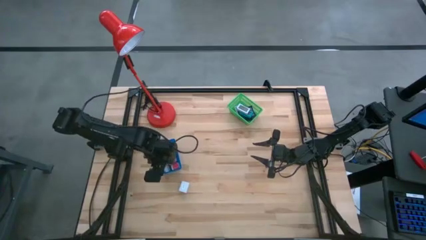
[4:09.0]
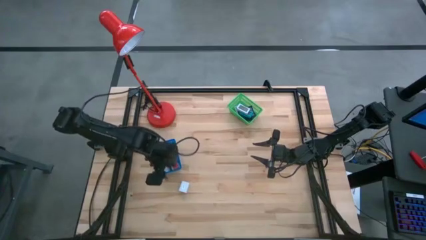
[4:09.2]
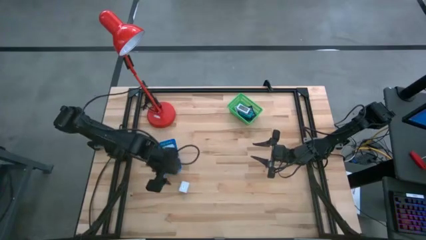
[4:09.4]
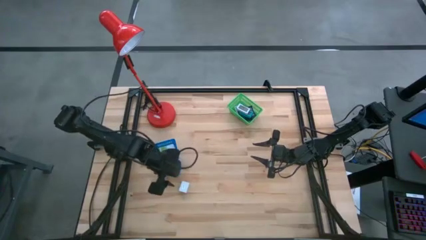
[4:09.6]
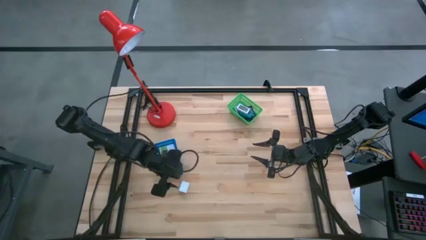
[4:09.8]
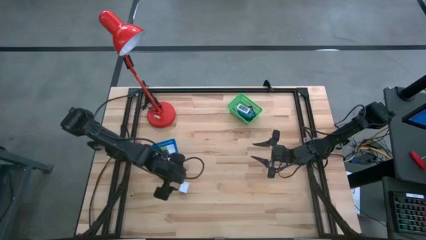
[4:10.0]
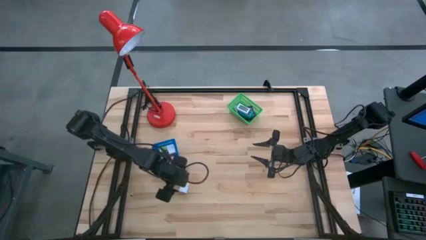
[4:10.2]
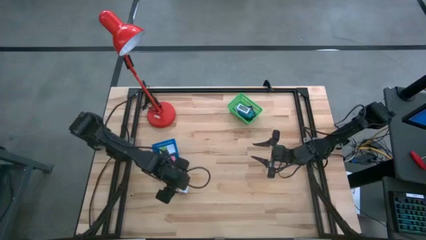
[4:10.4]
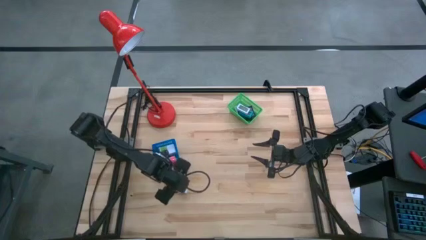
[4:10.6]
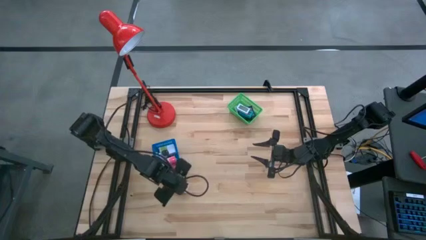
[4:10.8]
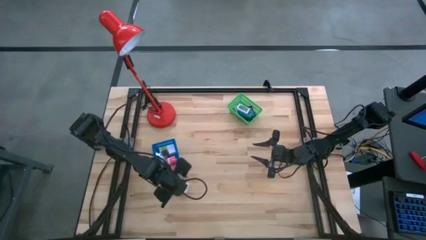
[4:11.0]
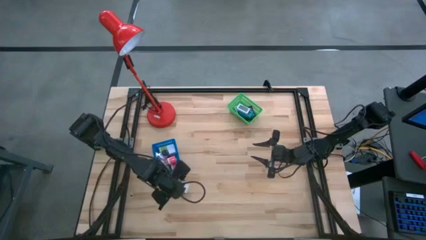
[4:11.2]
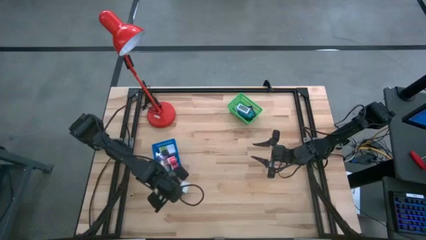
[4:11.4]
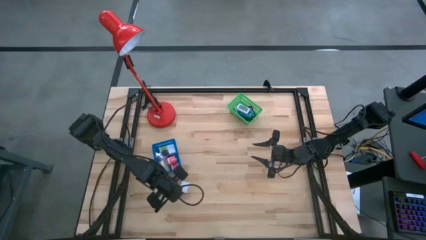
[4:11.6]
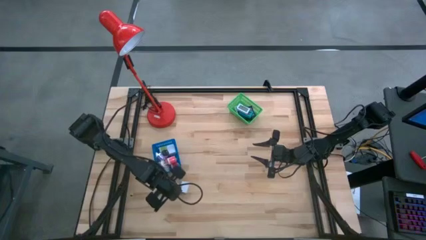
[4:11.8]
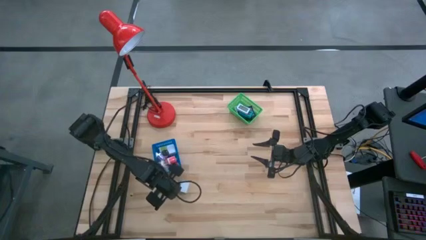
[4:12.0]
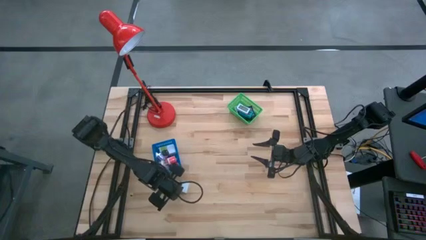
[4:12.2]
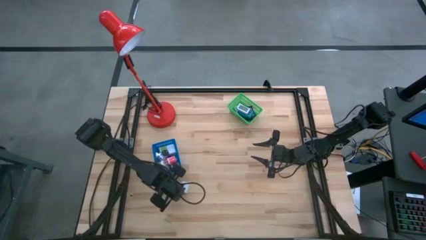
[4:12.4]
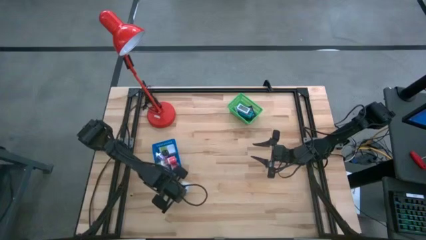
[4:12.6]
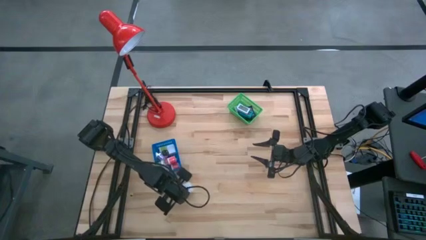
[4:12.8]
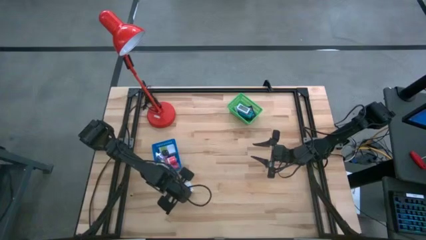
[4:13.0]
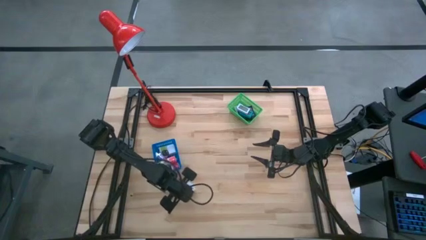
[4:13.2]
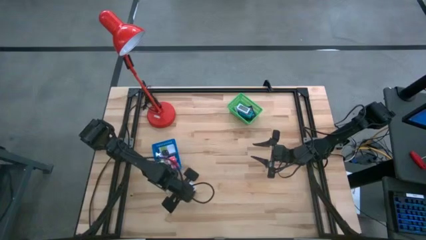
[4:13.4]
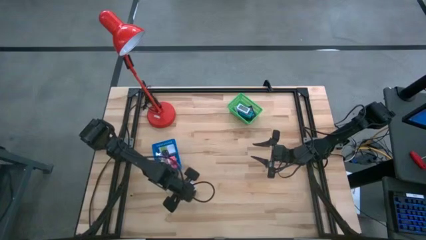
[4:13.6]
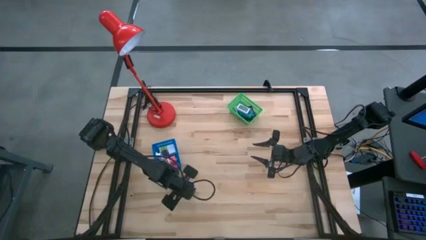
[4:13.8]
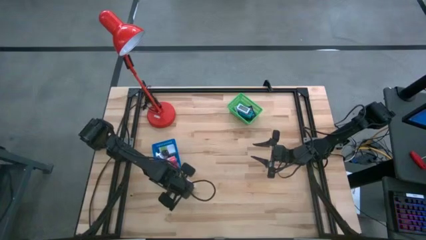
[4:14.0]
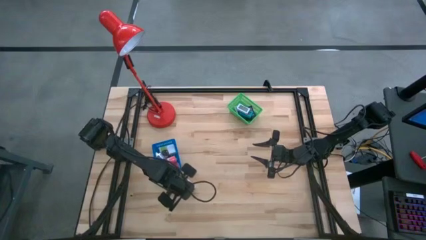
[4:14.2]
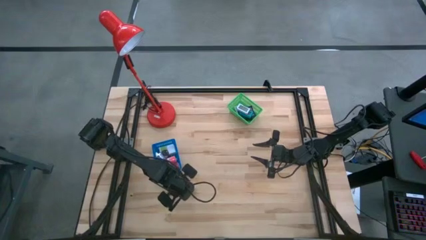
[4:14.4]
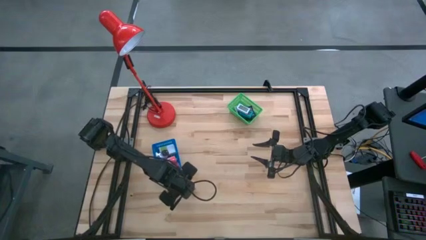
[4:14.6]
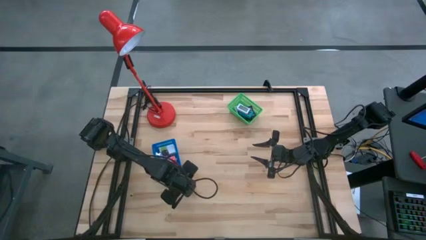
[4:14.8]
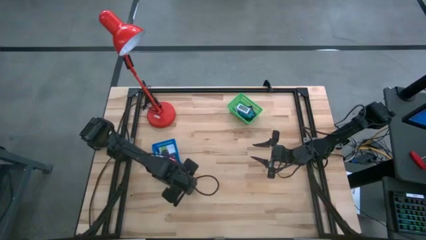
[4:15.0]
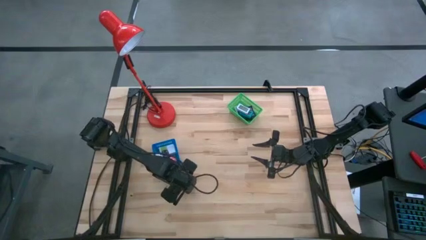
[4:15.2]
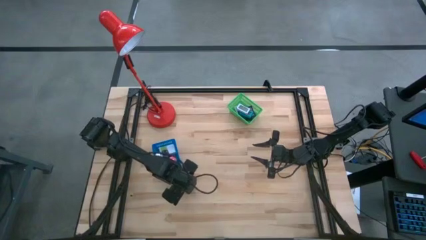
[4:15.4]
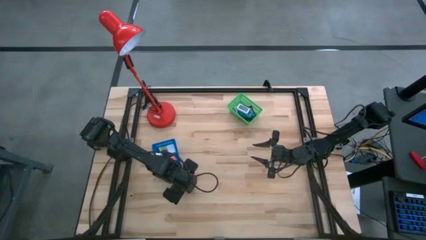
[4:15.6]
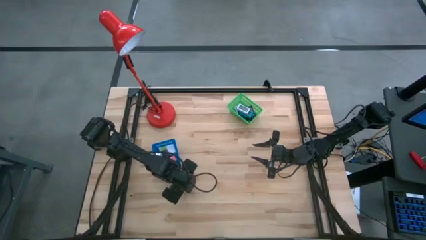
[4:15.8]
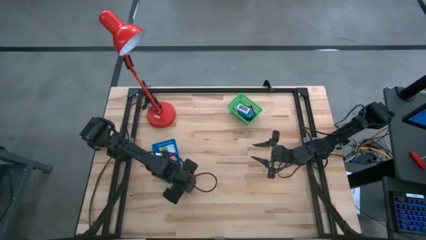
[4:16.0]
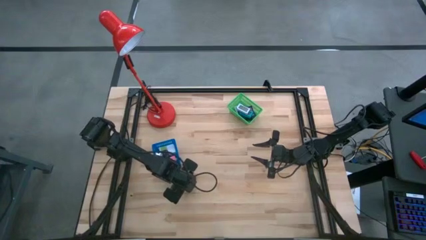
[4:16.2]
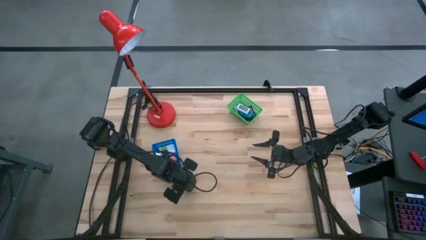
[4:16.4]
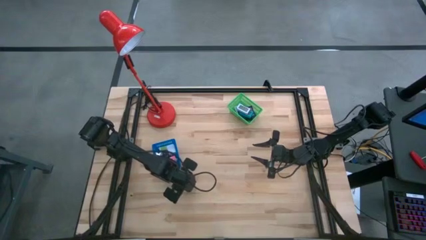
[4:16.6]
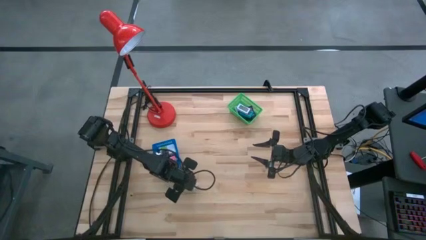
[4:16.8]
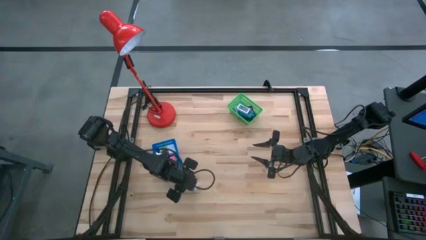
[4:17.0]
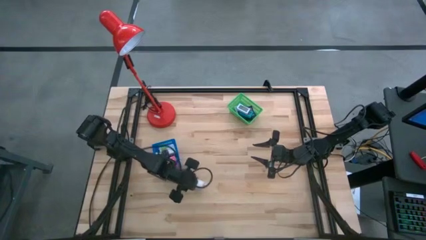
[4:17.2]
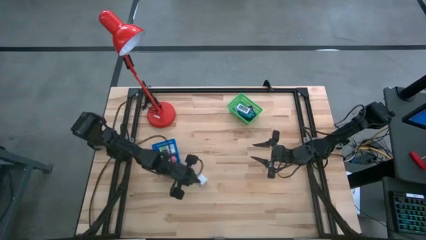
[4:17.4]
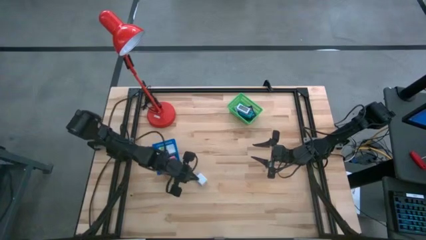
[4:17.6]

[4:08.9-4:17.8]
Task: Pick & Place Office items
Put the white charger adapter into the blue basket

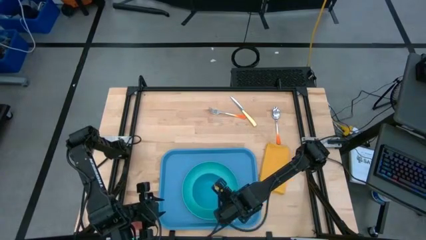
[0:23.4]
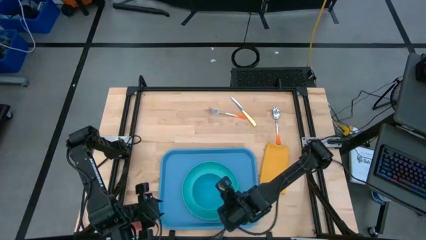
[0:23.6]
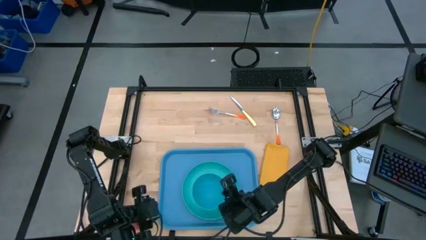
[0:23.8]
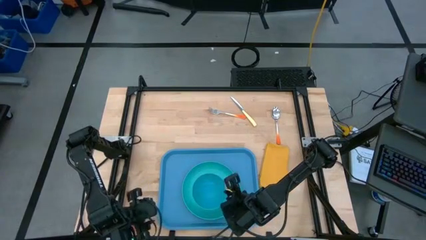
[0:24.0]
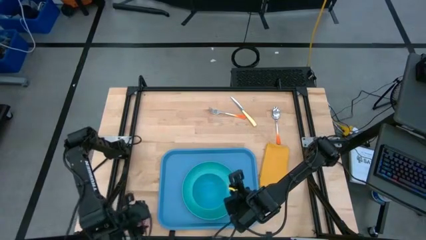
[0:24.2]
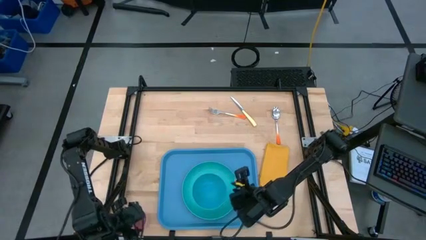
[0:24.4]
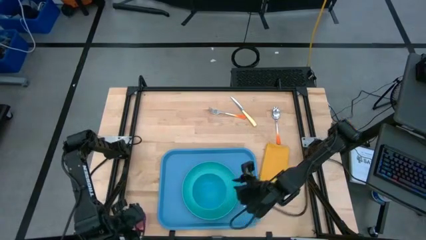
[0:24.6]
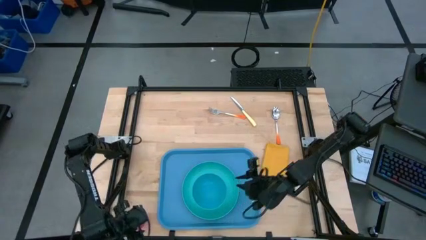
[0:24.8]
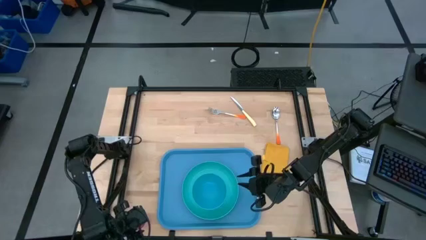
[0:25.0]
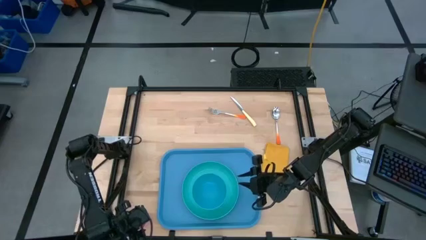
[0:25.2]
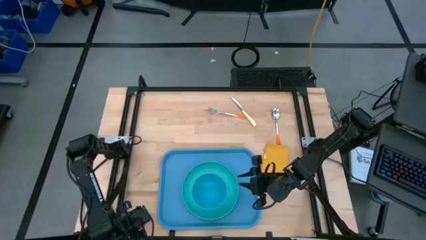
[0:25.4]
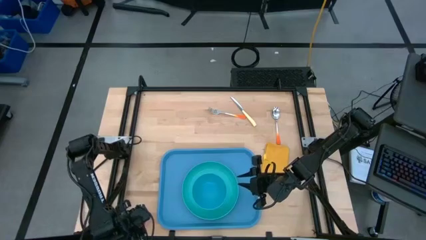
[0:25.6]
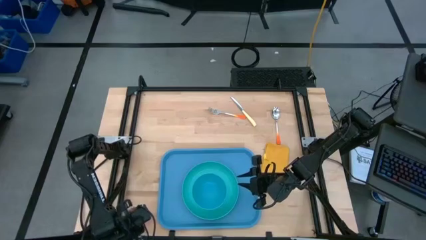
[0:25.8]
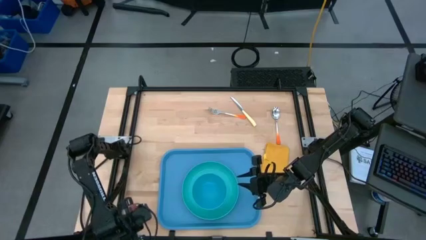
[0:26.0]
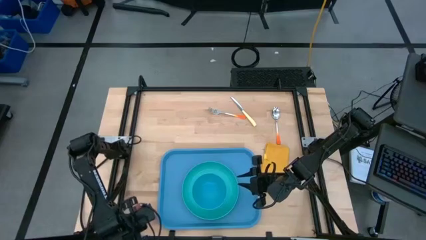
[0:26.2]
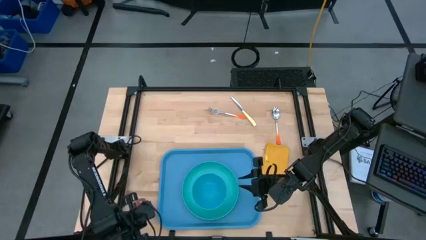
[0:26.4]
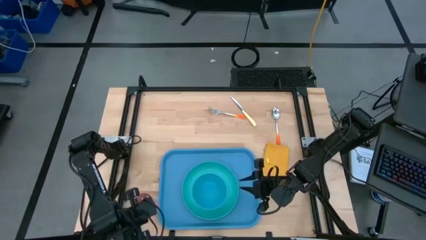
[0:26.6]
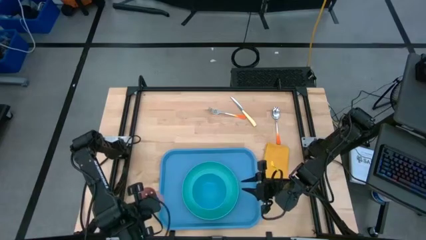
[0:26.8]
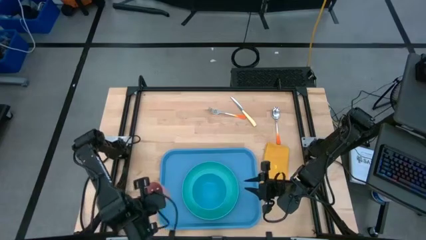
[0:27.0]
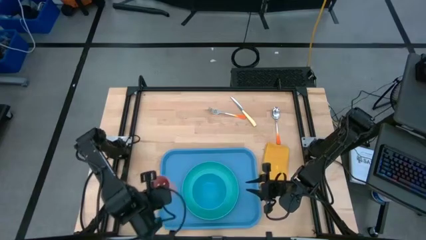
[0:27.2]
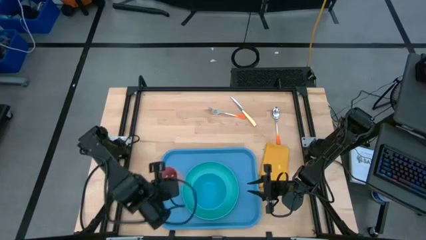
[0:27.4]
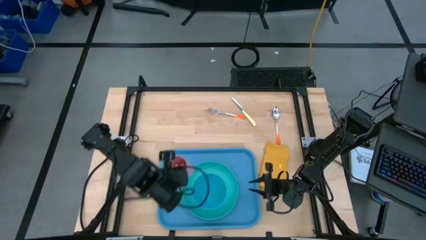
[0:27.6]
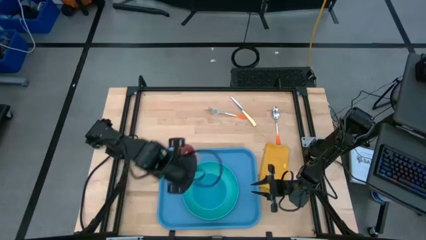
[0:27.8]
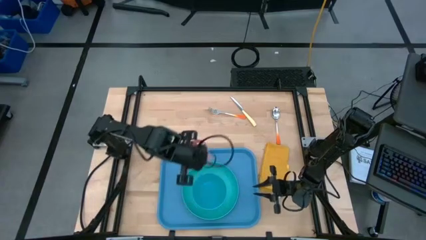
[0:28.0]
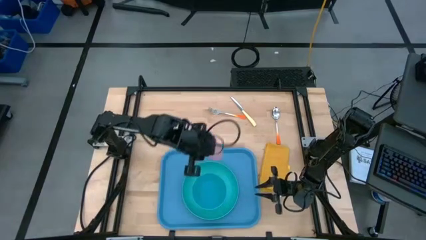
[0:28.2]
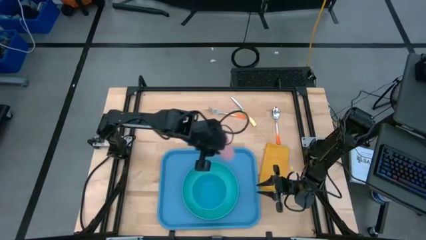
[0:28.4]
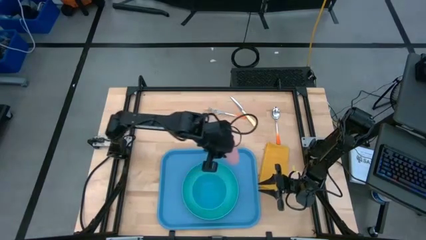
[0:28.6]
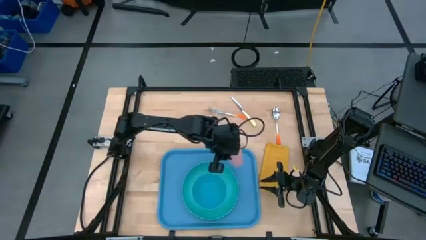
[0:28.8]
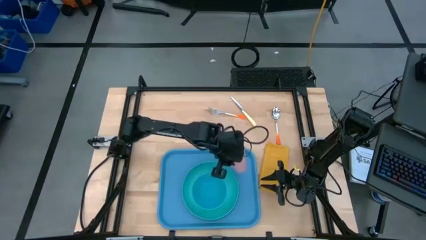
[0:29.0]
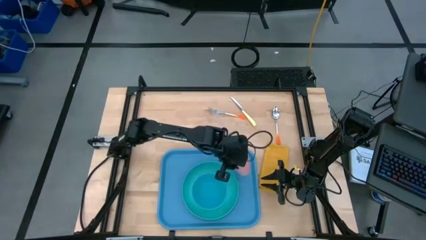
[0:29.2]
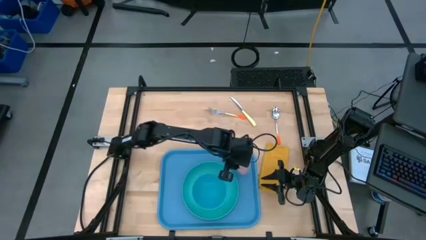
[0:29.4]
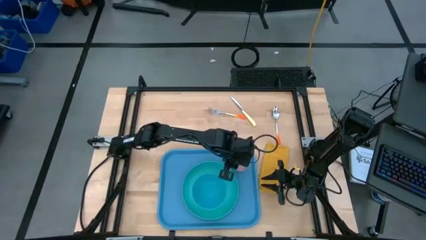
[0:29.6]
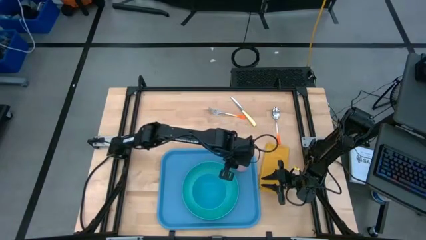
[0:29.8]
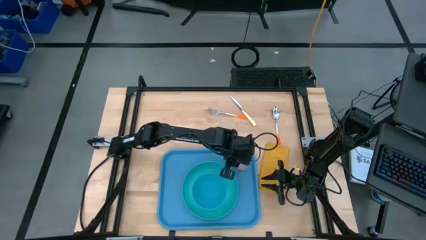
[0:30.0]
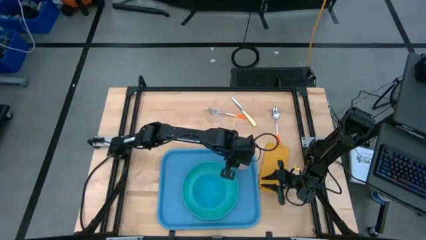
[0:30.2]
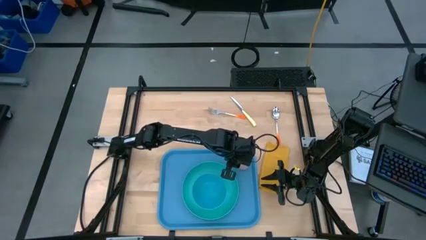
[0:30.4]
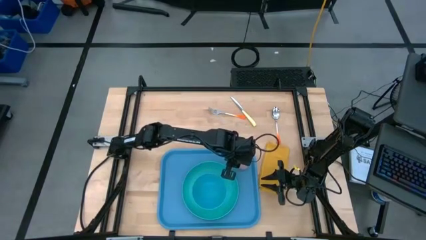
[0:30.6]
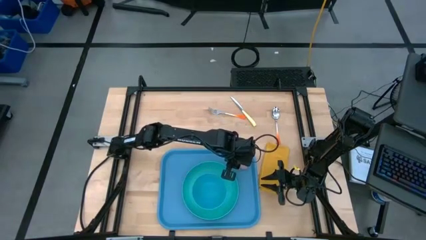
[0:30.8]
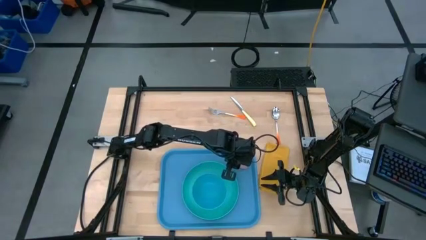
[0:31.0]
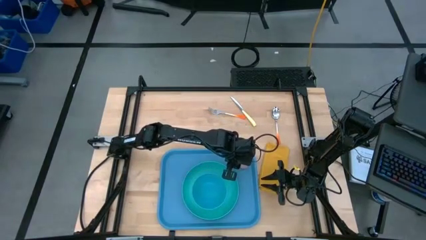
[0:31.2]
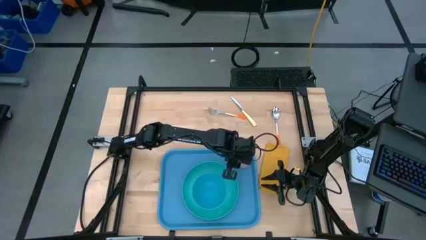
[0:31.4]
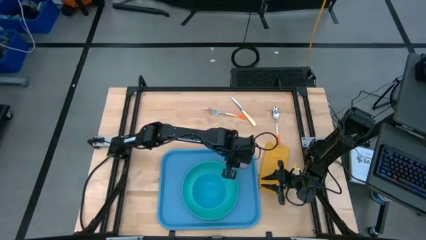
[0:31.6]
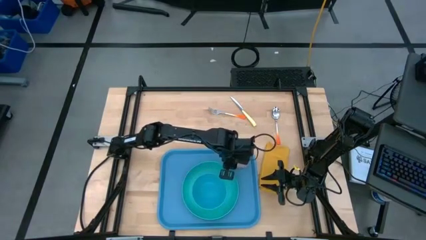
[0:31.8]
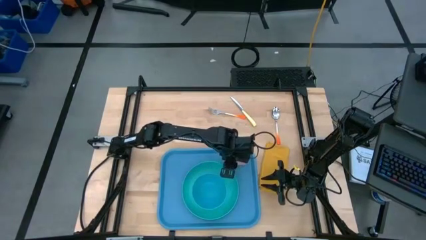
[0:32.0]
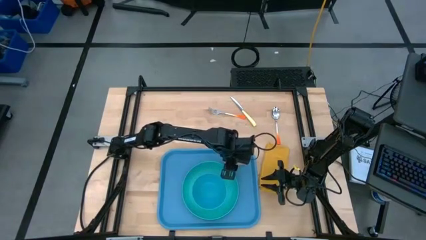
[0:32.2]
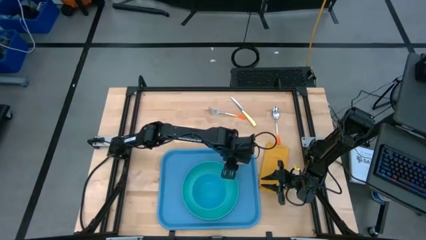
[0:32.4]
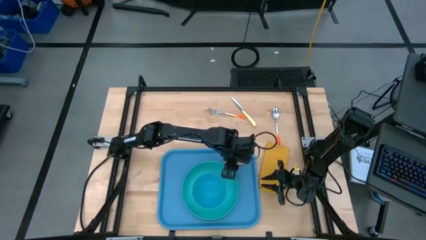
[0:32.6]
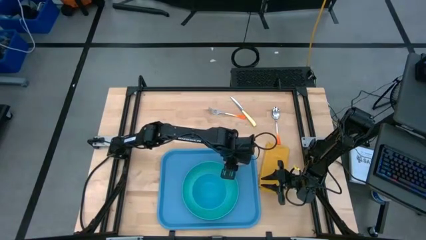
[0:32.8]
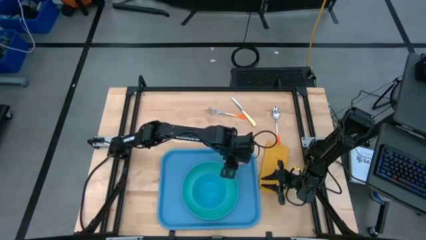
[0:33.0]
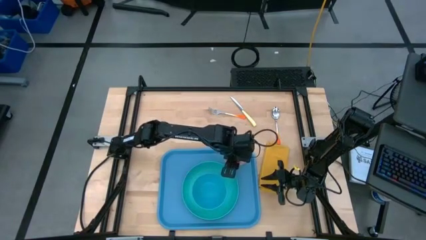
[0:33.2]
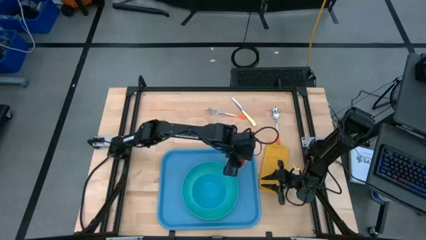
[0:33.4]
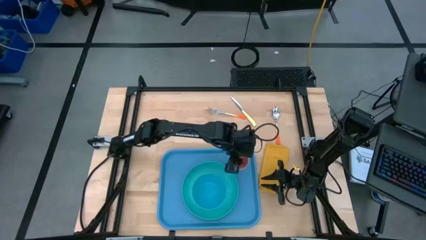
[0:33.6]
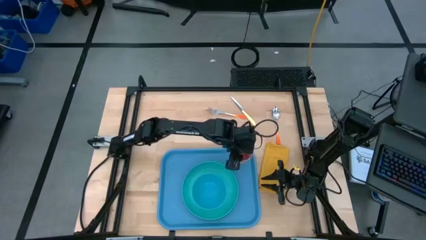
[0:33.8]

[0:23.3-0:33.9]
Task: Set up tray
Put the pink cup on the blue tray to the top right of the green plate
